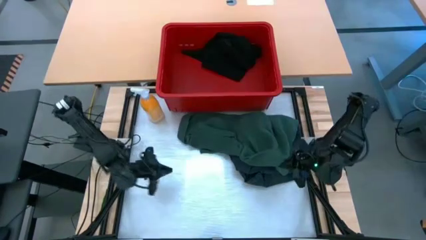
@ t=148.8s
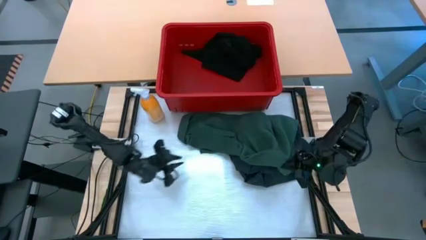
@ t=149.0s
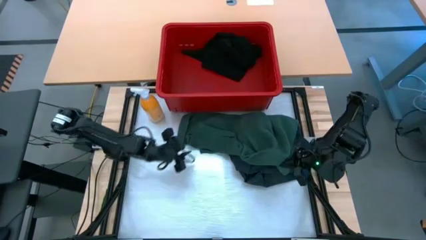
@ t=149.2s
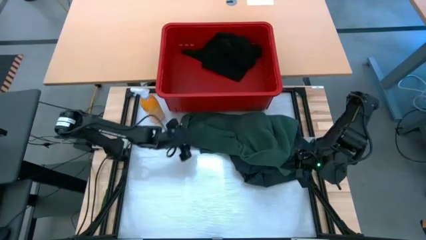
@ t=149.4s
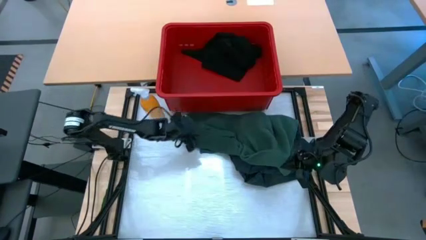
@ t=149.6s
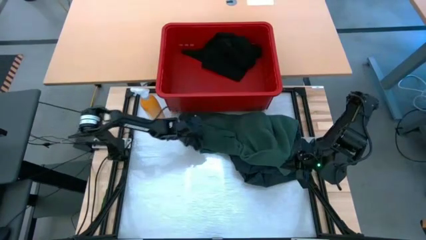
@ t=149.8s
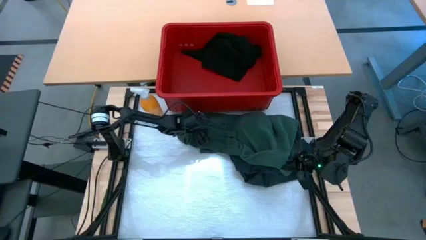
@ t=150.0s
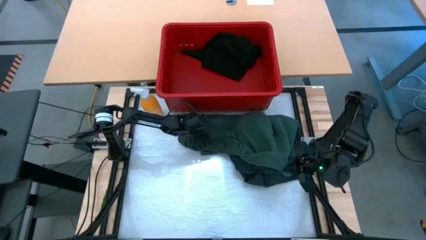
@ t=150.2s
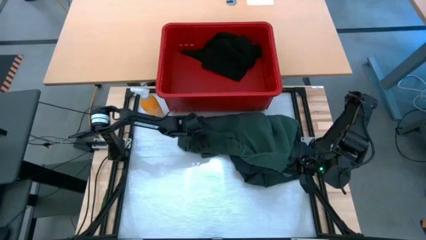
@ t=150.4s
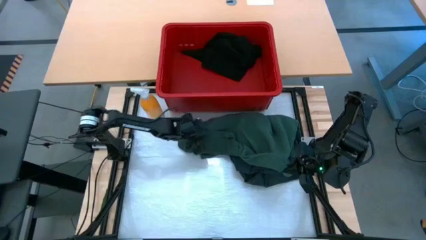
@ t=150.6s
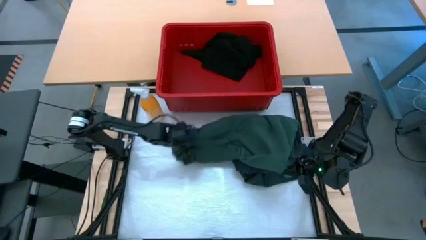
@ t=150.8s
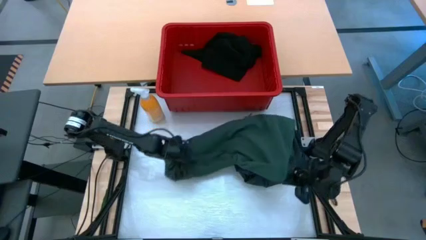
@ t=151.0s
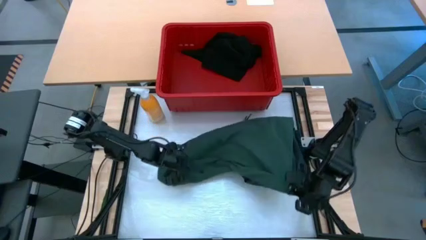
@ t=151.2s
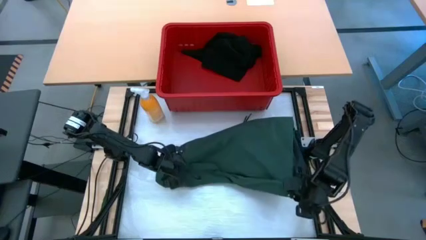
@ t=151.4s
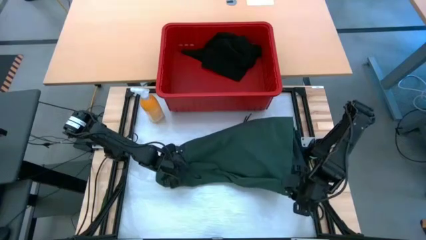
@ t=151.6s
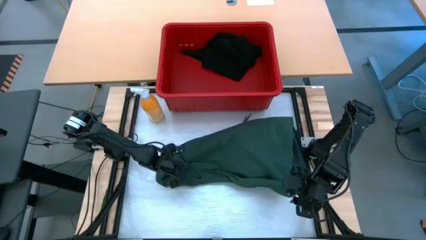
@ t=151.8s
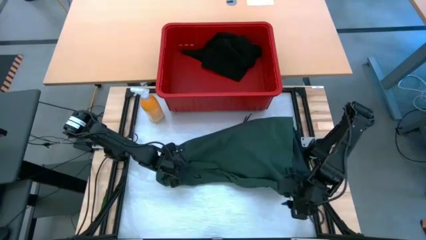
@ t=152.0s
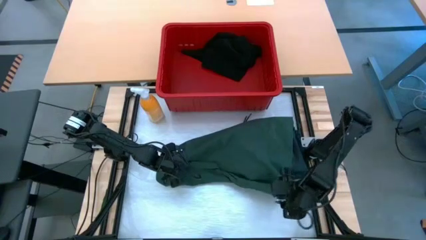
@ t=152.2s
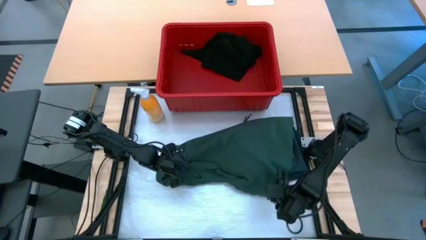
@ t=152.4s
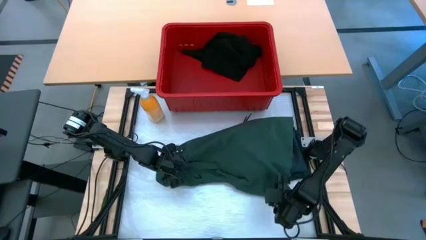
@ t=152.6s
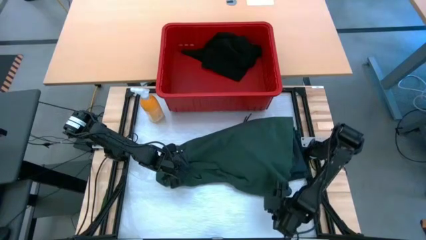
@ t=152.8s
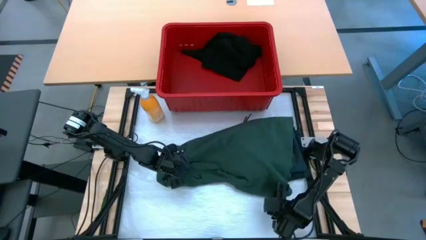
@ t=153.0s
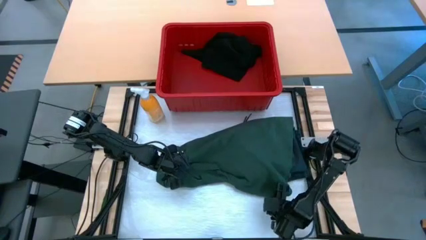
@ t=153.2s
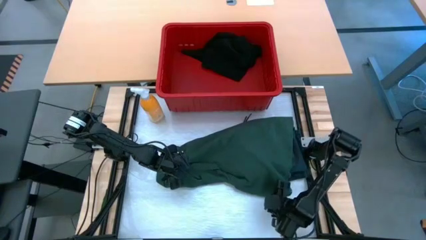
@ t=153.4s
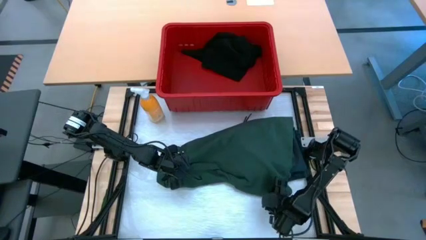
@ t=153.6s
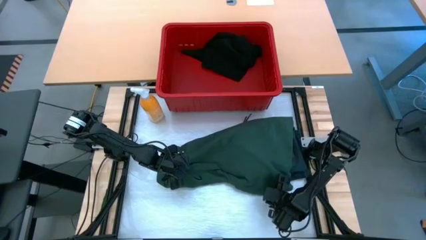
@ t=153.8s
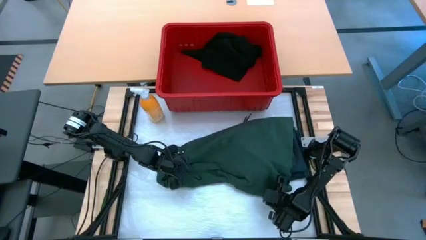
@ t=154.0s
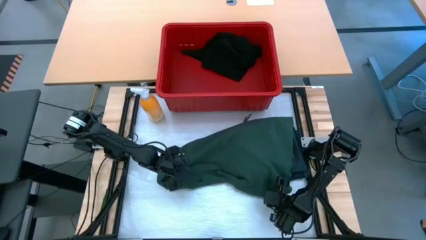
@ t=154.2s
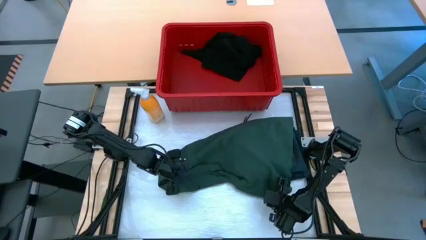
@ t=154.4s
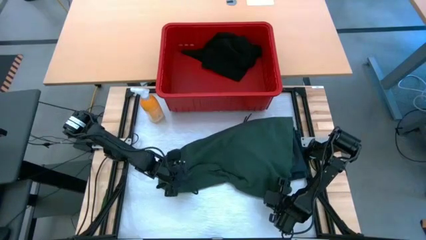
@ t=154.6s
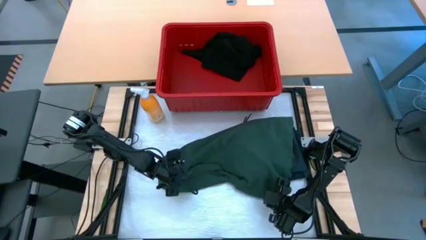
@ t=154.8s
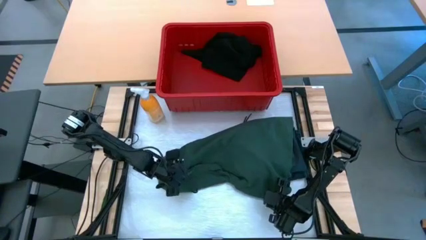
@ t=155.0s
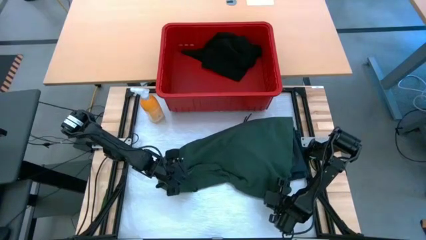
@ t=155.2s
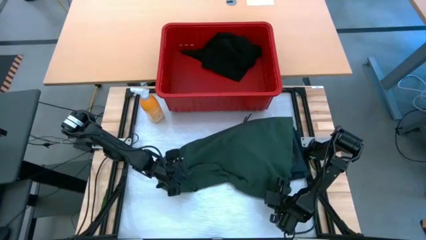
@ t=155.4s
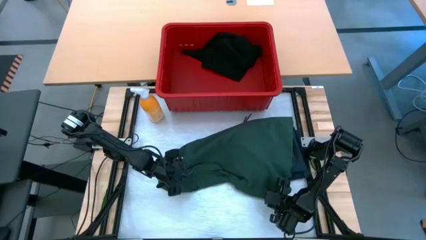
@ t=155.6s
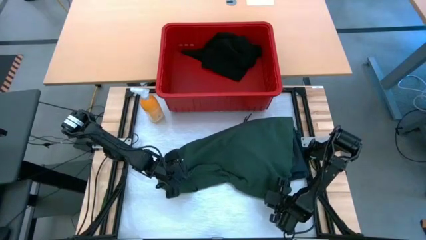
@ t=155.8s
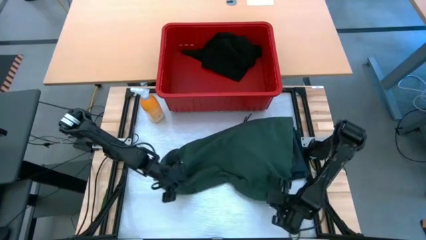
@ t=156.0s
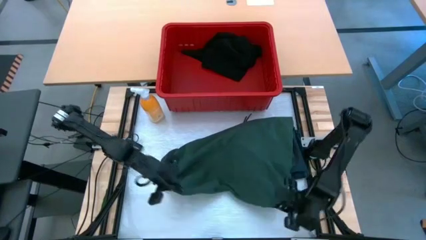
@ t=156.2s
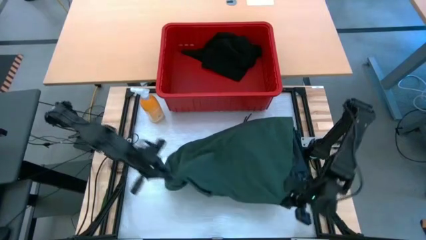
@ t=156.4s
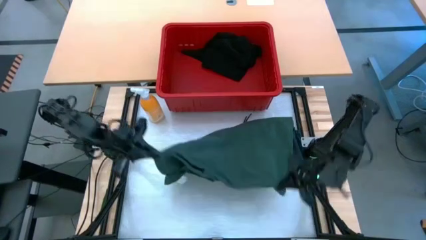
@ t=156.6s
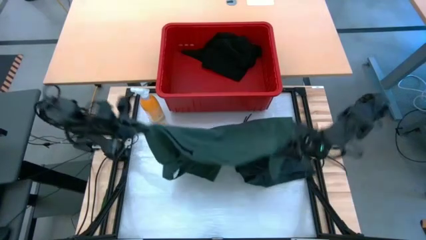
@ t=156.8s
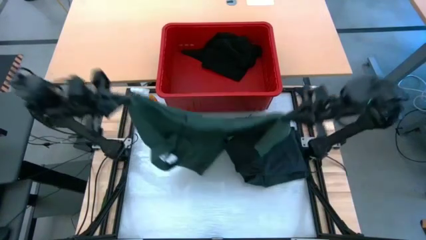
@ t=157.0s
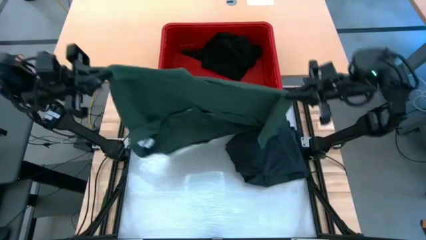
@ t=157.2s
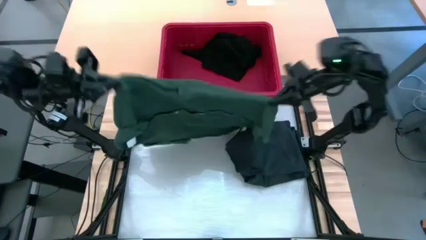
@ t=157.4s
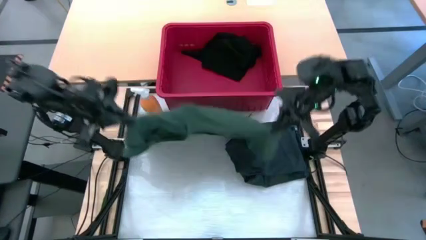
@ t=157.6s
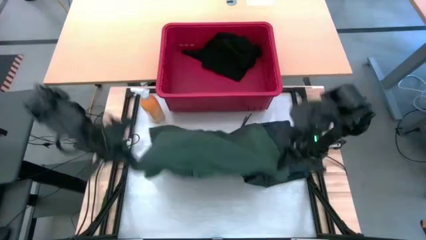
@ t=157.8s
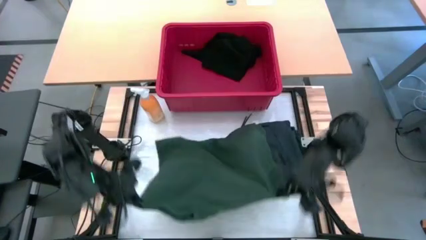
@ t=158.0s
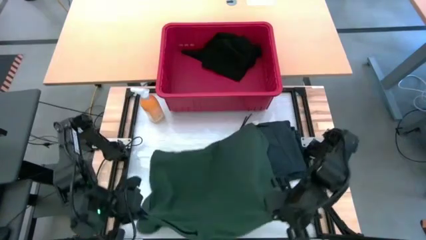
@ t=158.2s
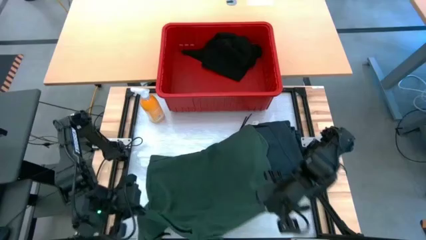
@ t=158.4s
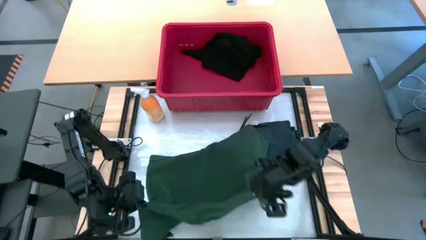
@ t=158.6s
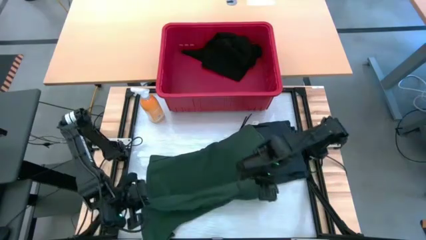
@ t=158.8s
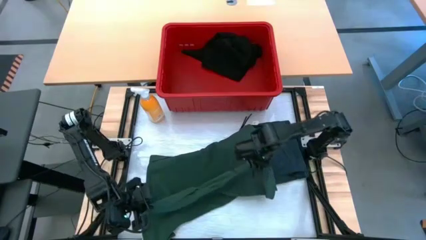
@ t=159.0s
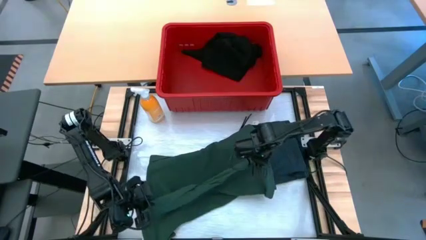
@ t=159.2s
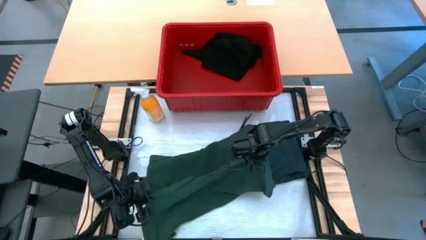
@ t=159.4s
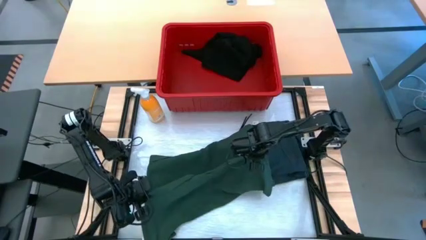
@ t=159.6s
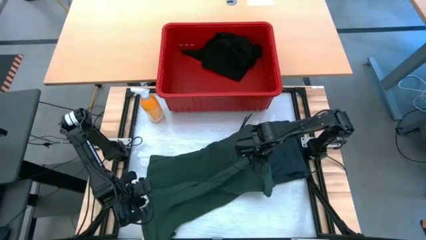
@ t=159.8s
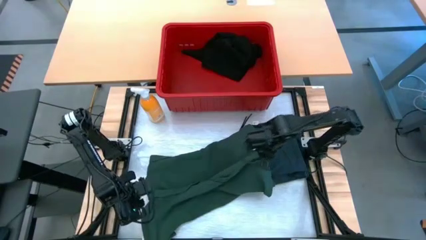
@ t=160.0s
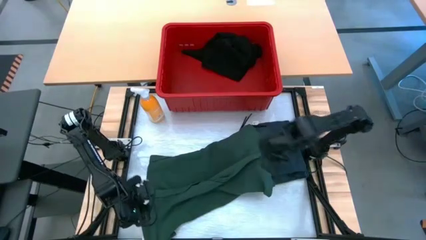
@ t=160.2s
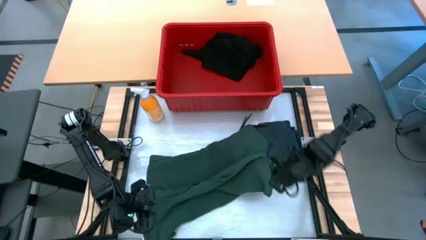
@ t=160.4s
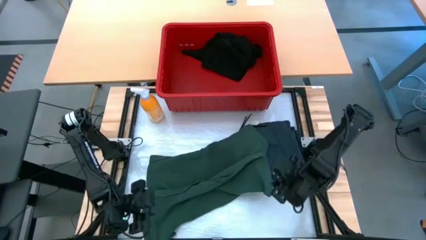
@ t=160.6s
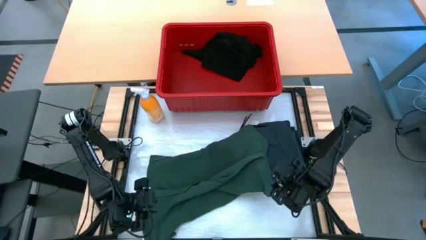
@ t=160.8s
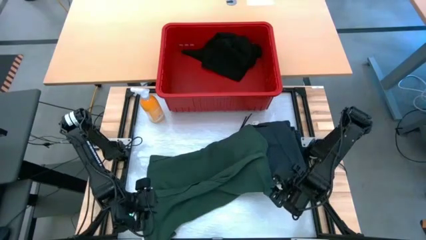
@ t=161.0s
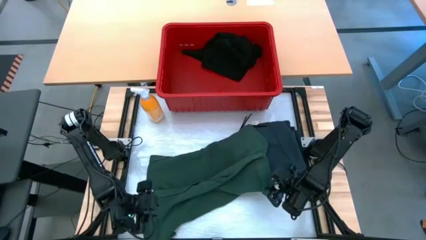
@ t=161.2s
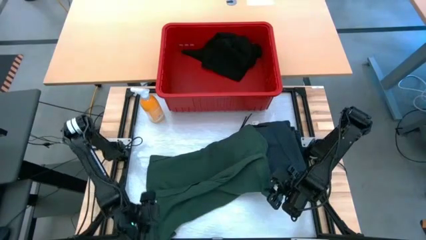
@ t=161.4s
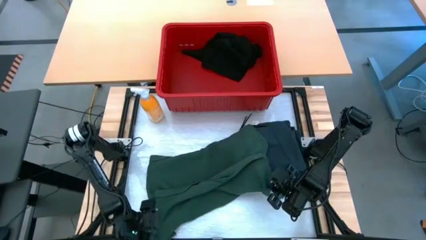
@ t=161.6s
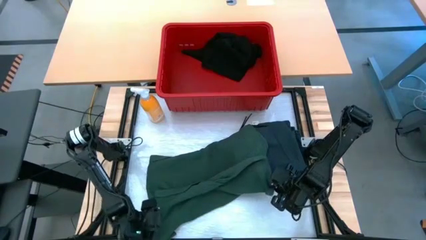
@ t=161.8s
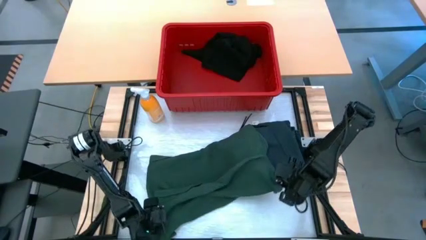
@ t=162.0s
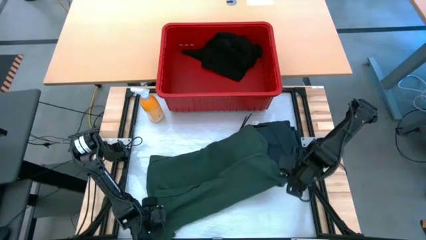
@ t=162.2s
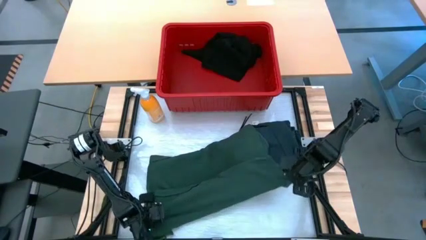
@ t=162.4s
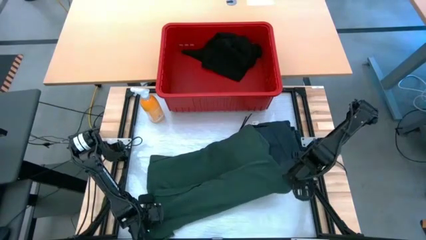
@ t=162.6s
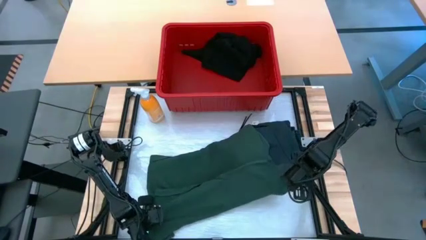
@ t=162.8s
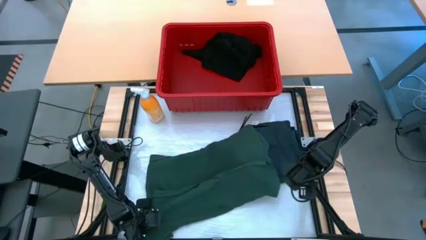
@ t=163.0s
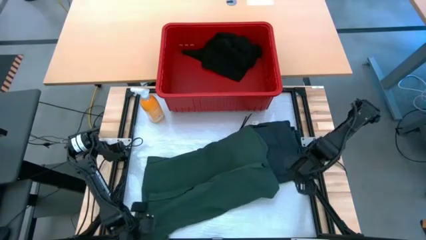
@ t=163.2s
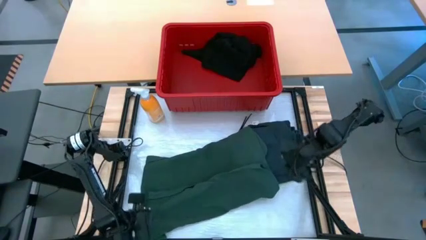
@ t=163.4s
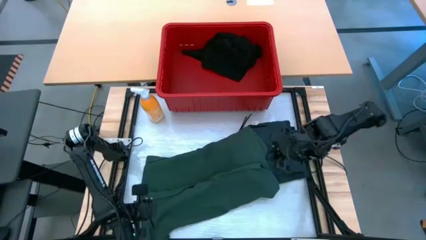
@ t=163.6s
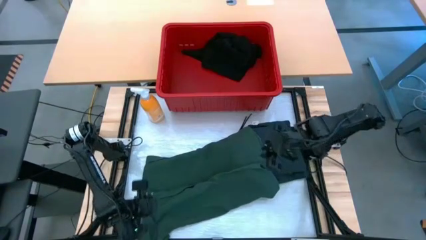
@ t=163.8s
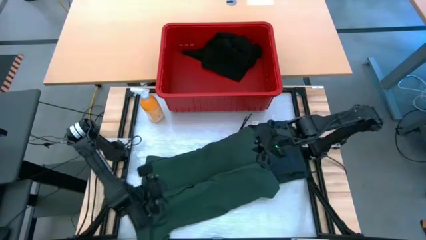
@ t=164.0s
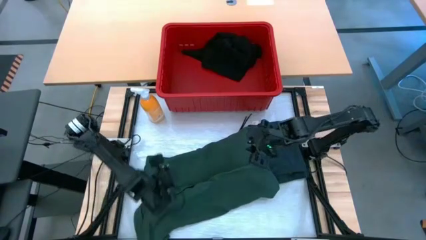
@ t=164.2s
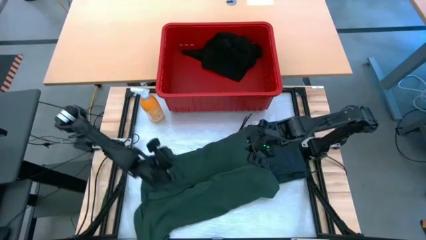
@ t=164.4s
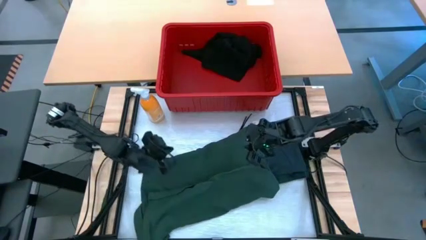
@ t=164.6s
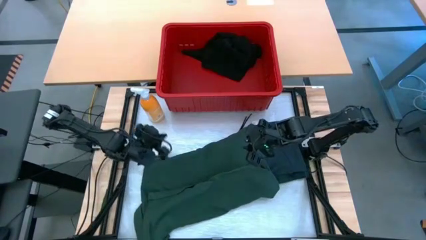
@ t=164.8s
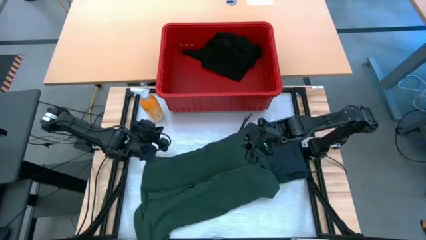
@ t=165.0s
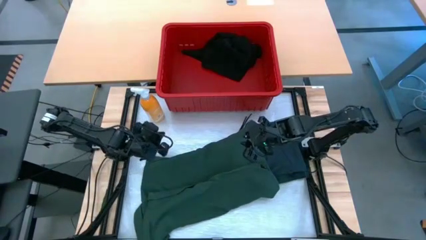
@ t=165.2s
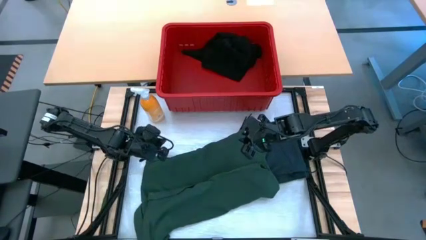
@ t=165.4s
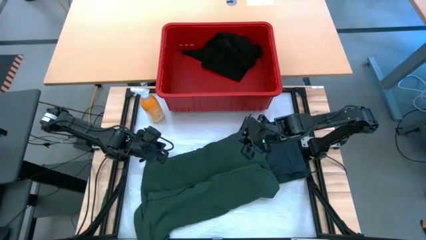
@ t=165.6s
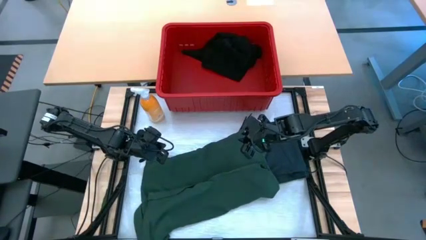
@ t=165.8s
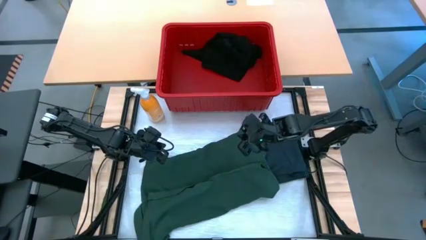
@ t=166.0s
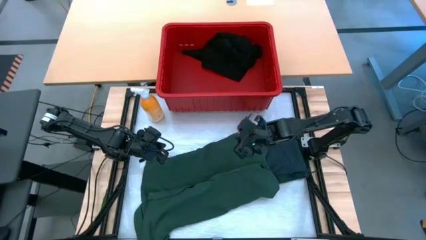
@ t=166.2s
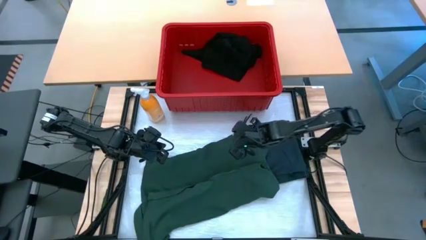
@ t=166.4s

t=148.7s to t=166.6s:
Task: Fold laundry
Fold the green shirt
